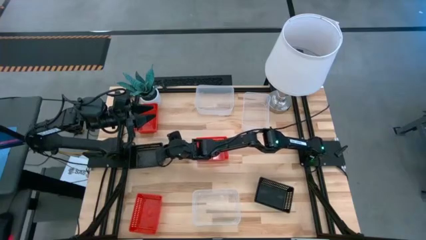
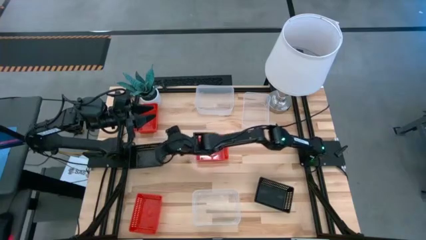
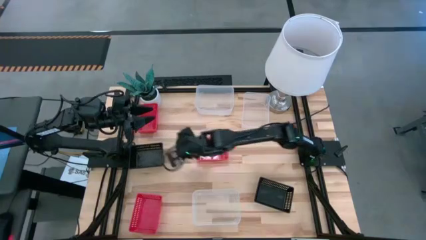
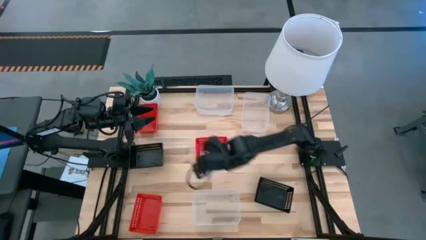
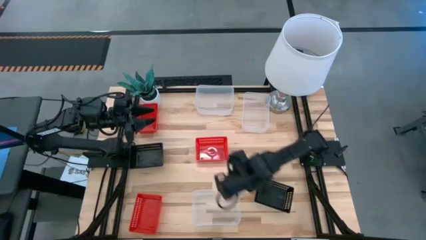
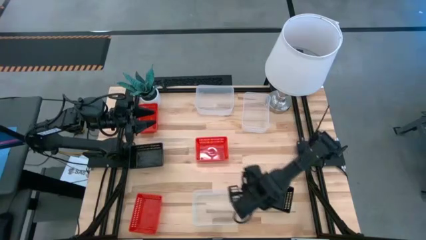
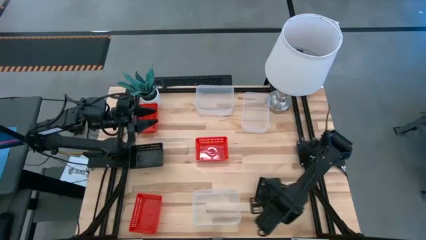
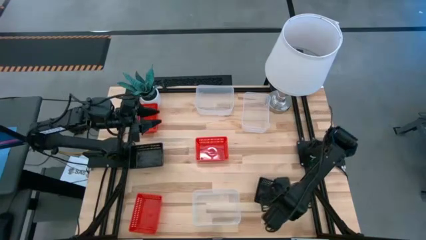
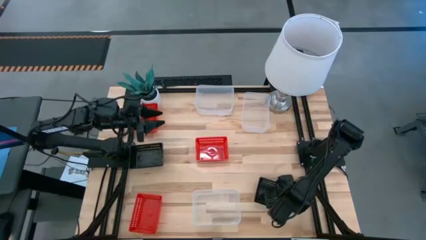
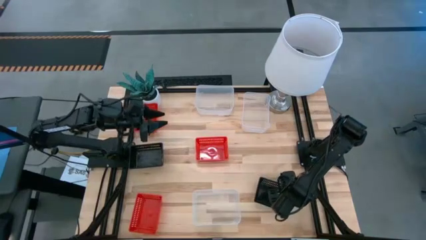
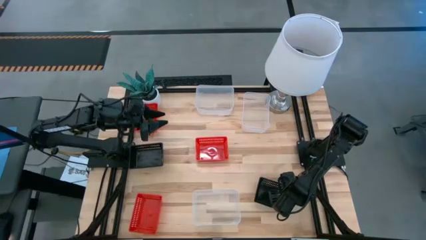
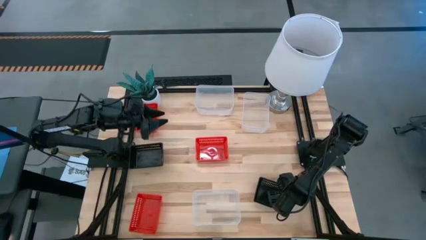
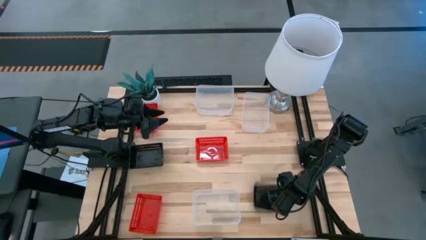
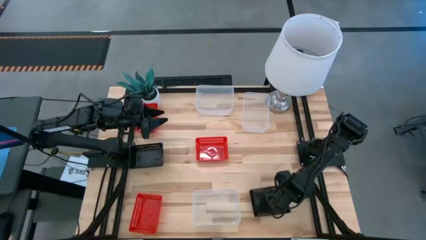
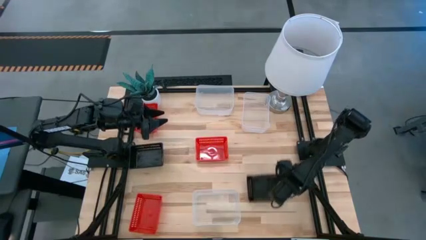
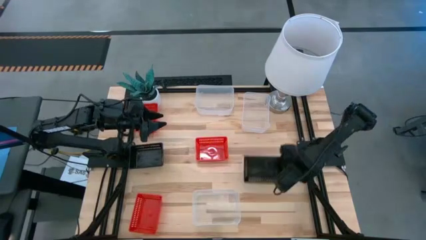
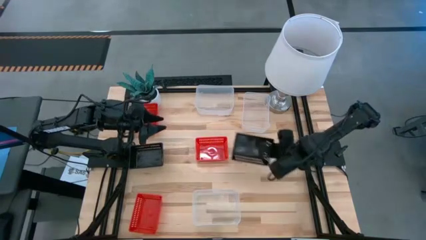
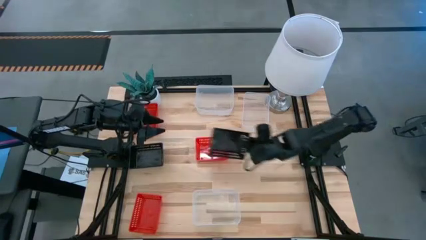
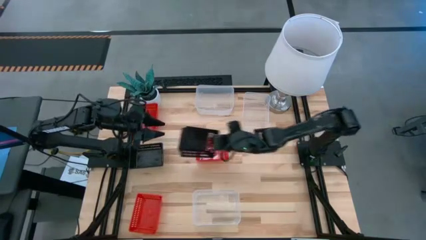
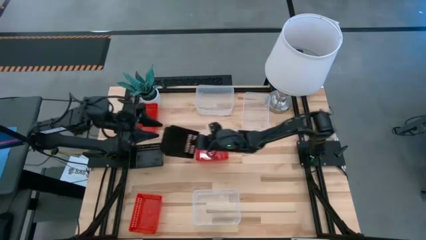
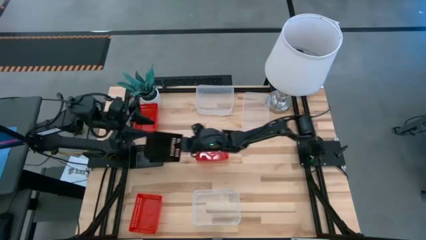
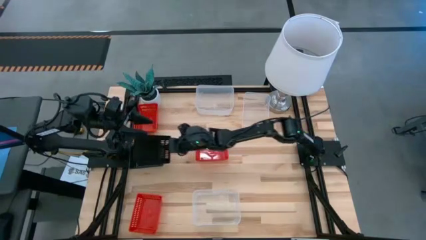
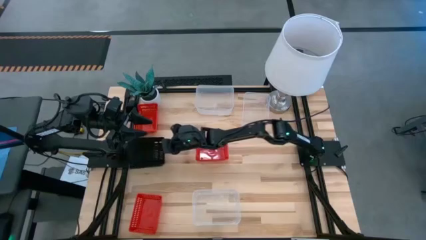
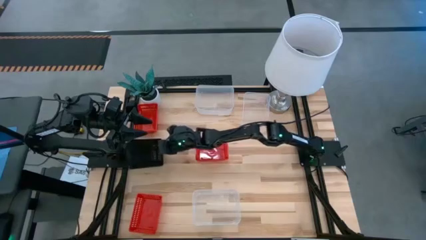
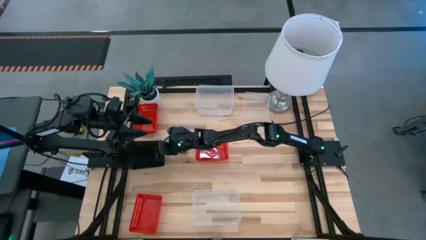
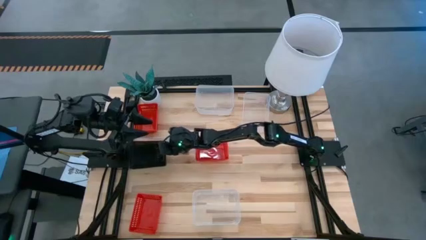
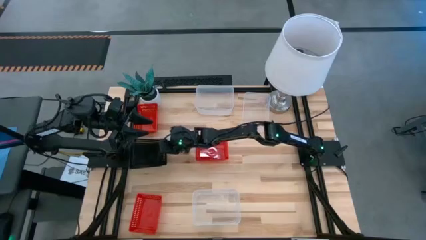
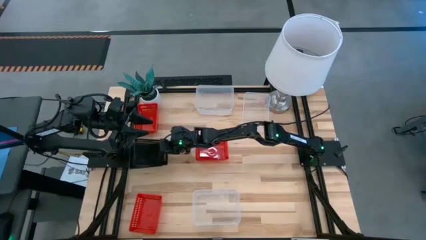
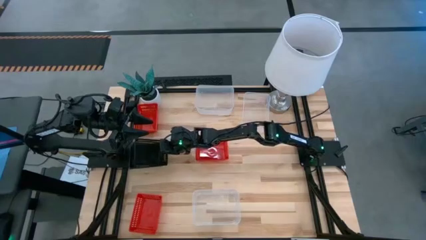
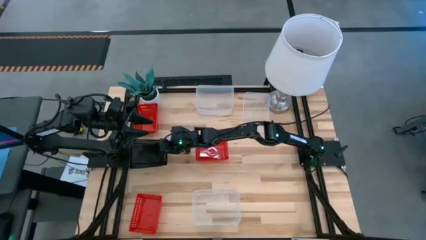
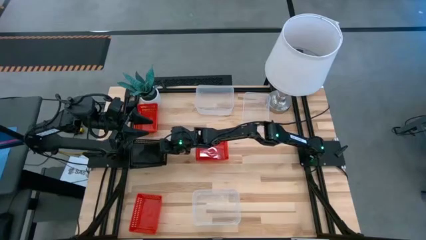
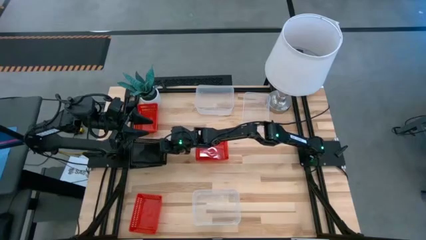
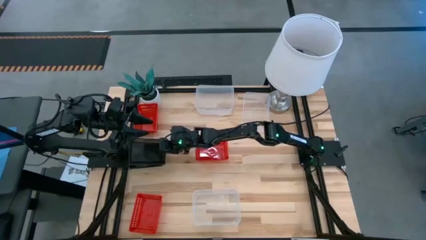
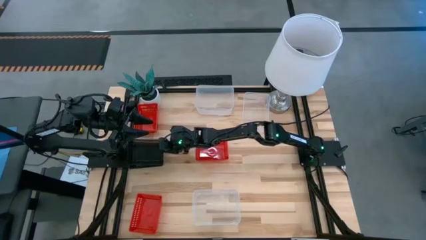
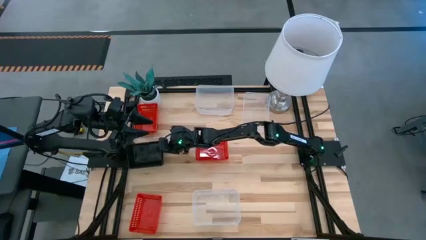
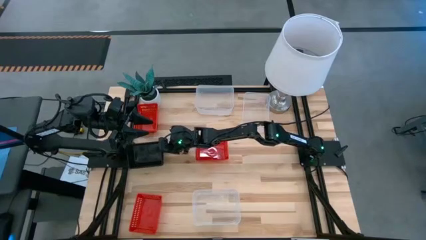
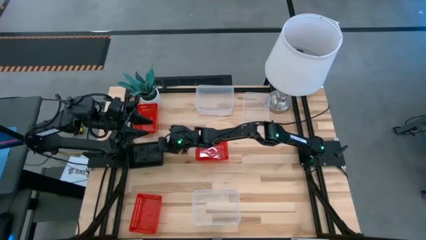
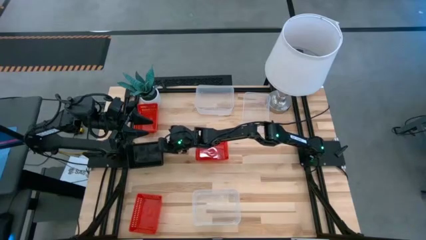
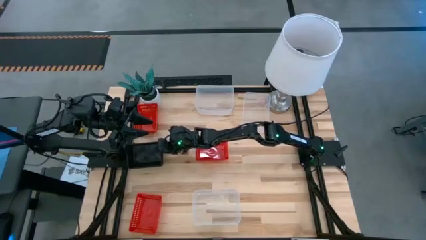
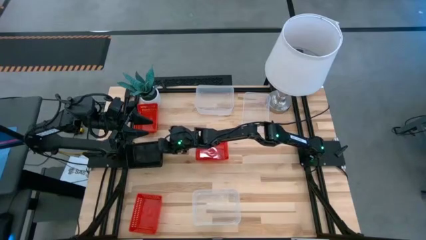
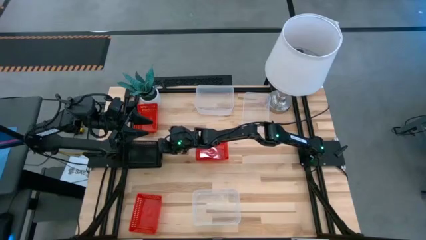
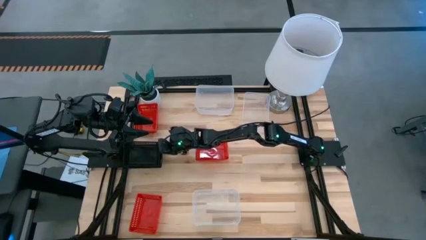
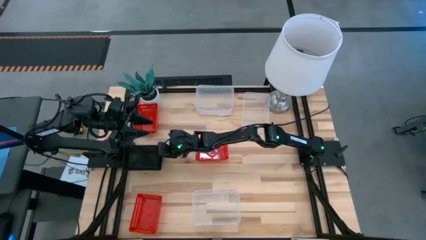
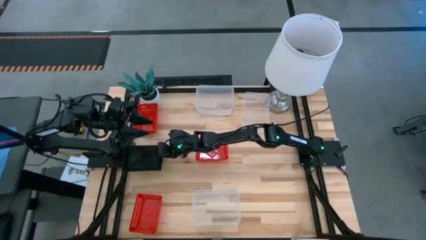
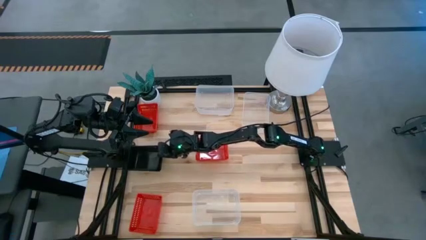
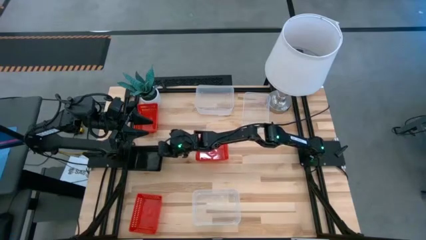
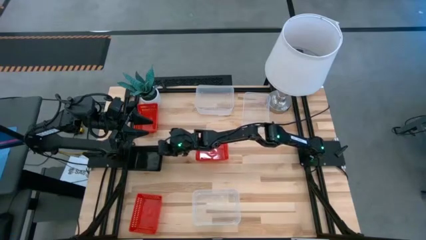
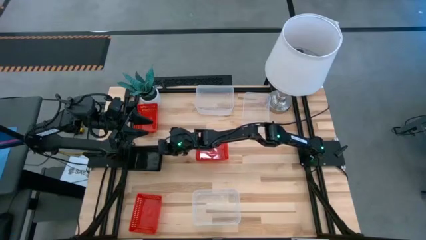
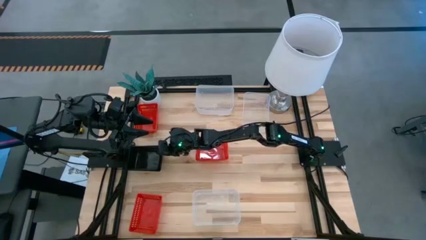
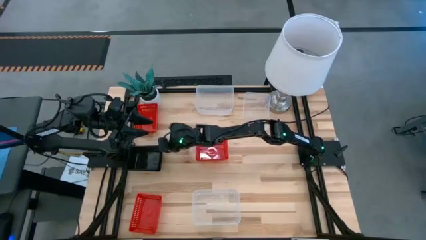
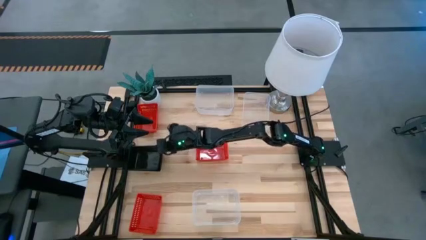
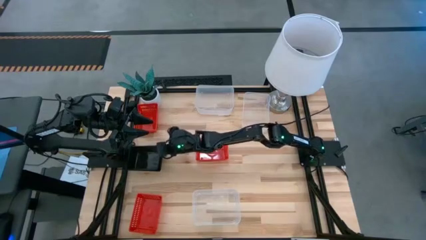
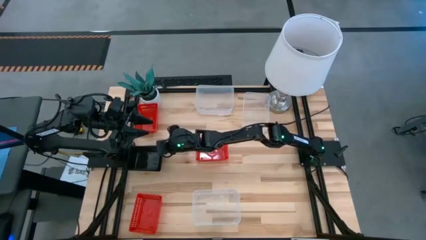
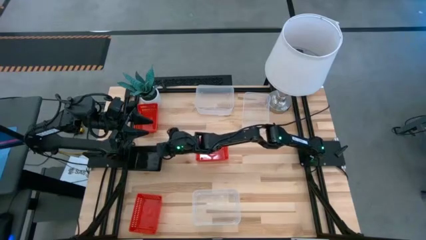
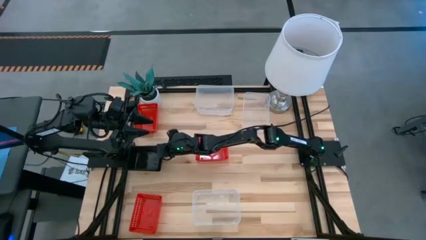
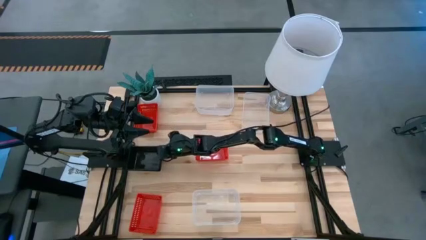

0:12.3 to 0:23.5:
Stack the right black bin on the left black bin

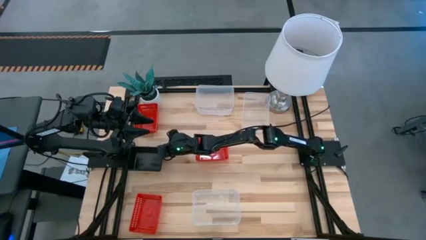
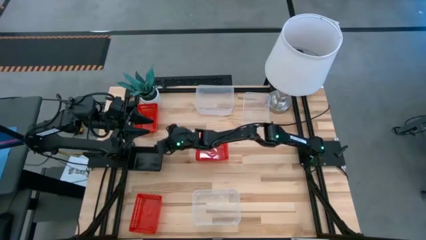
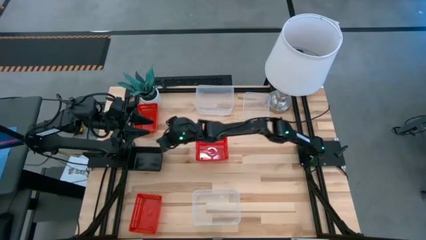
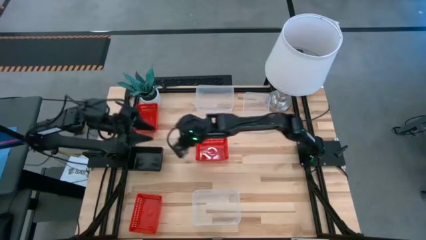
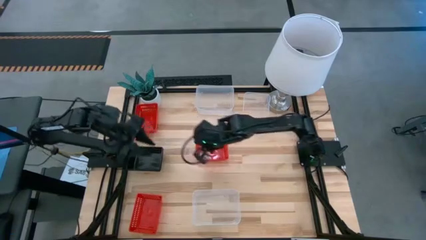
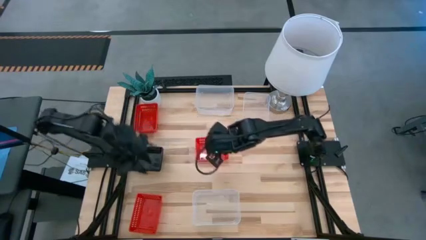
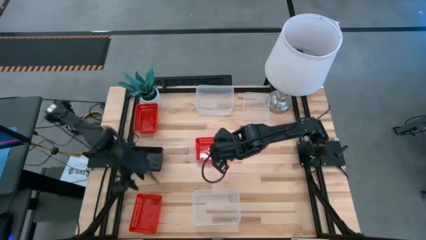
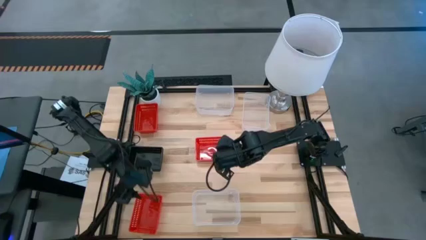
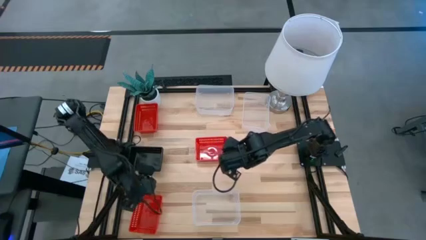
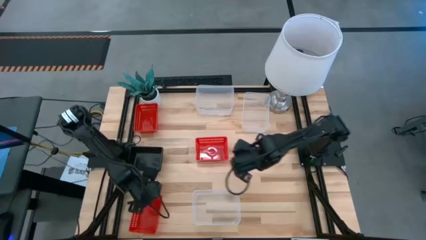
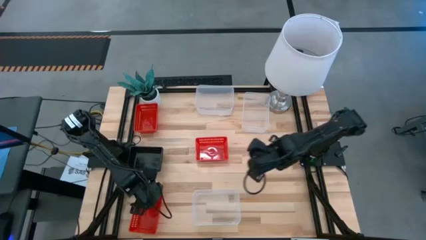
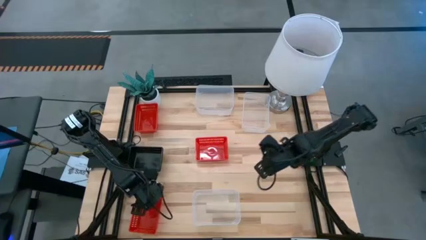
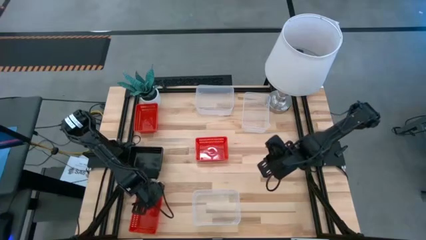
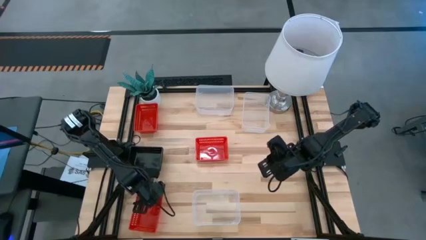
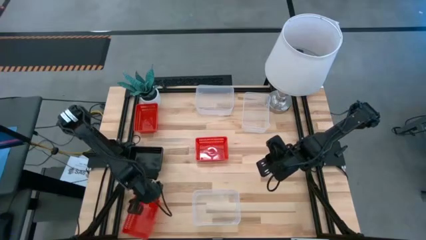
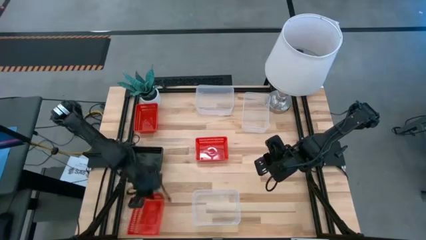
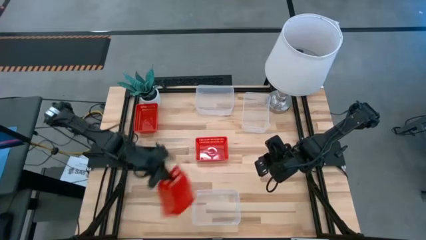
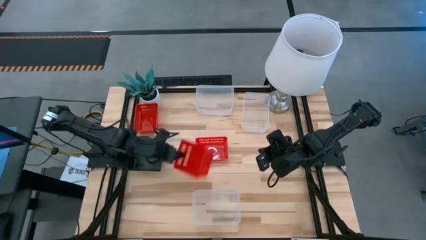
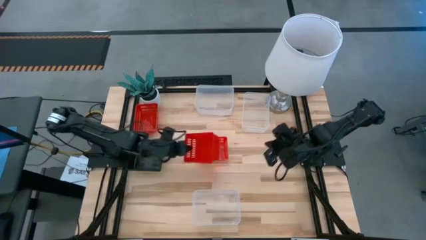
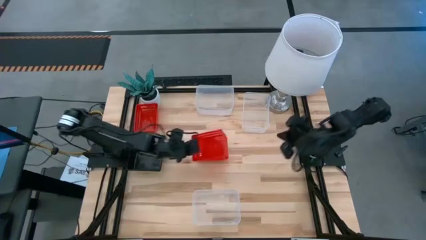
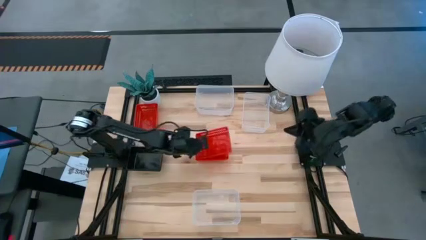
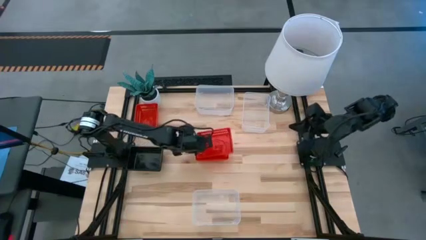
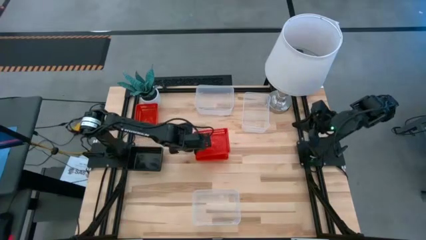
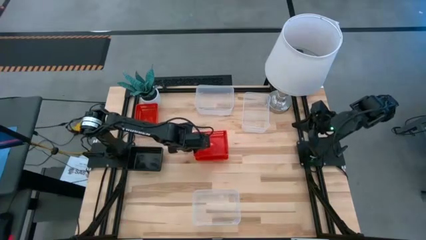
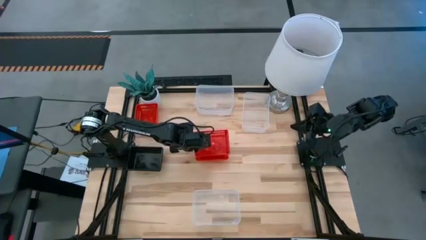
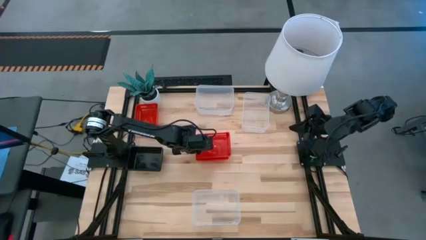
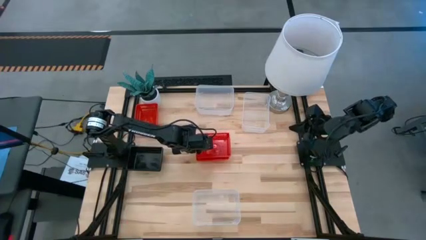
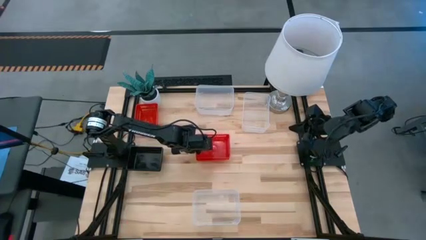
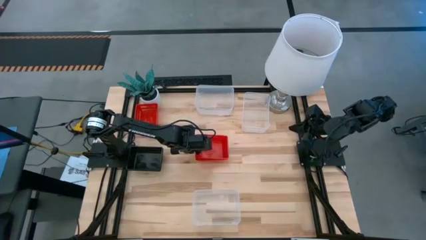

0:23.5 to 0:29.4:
Stack the bottom red bin on the middle red bin
